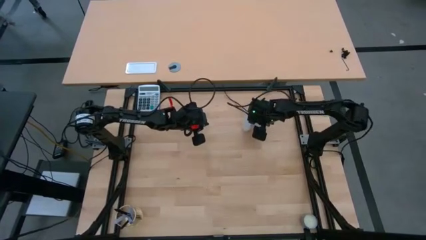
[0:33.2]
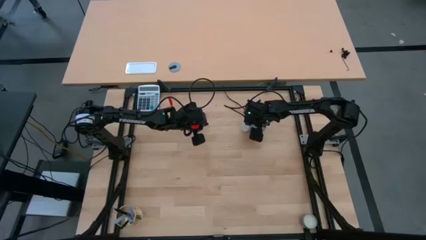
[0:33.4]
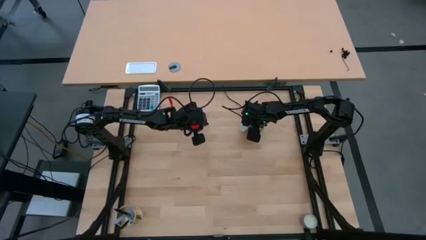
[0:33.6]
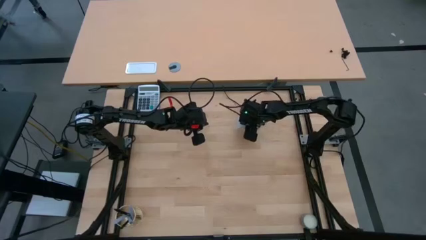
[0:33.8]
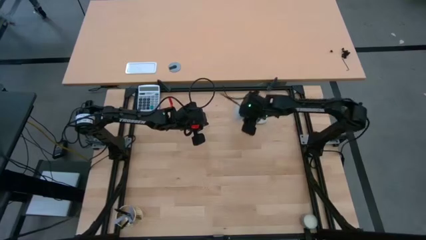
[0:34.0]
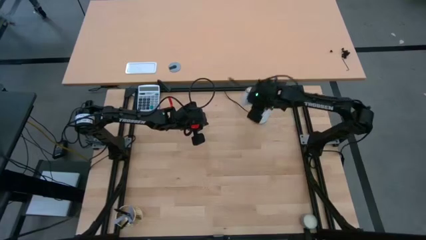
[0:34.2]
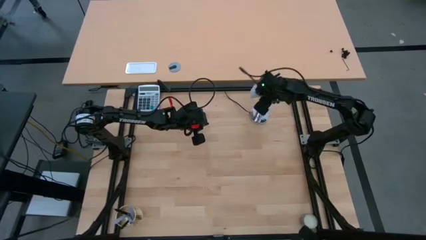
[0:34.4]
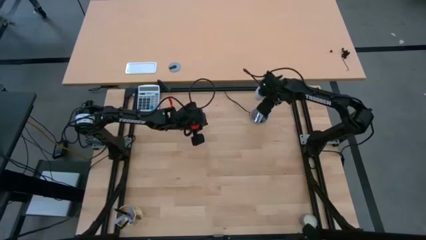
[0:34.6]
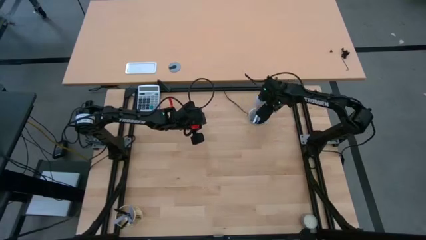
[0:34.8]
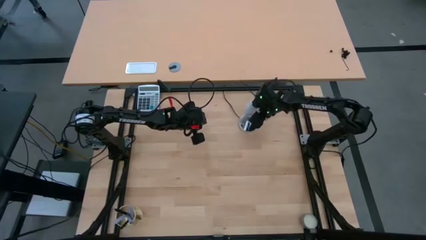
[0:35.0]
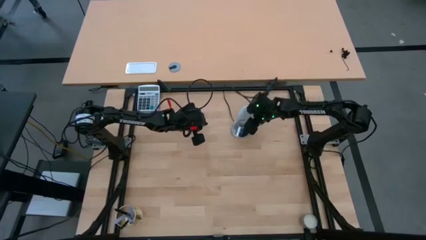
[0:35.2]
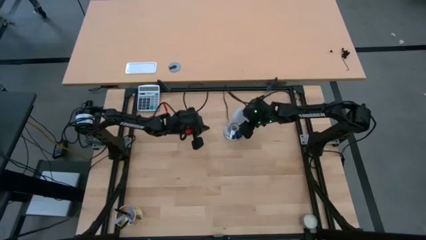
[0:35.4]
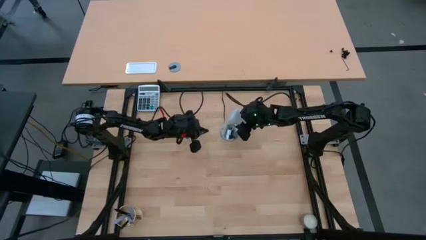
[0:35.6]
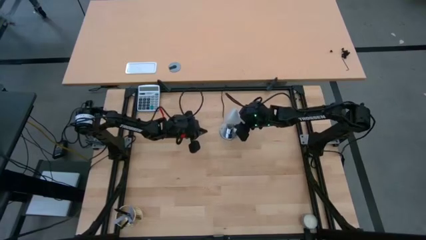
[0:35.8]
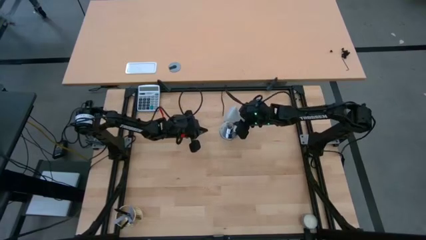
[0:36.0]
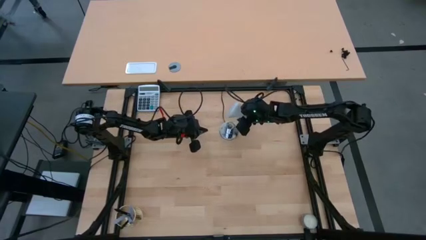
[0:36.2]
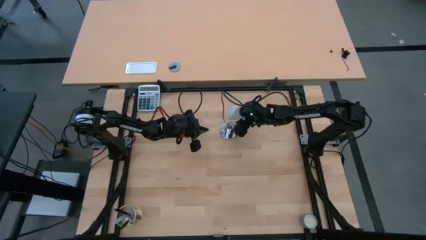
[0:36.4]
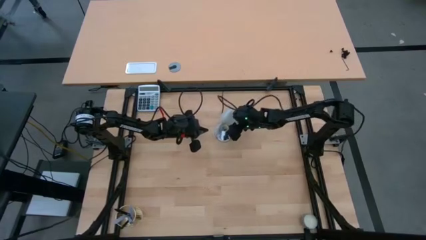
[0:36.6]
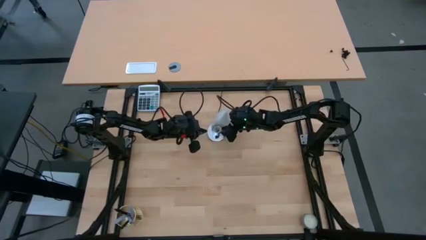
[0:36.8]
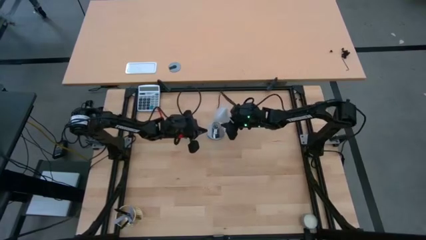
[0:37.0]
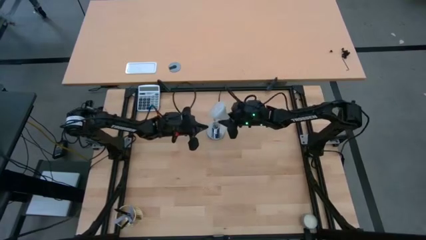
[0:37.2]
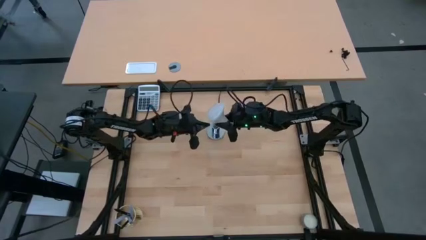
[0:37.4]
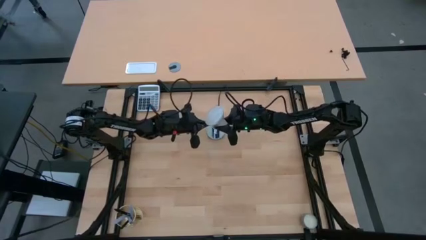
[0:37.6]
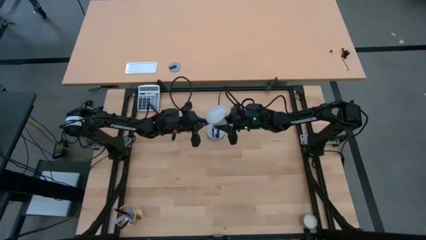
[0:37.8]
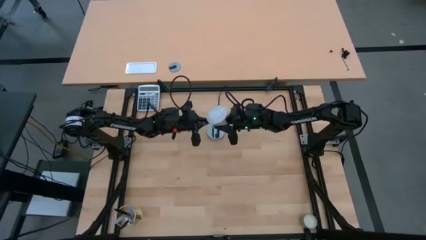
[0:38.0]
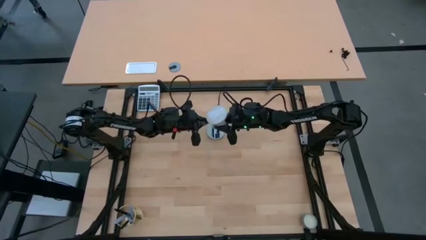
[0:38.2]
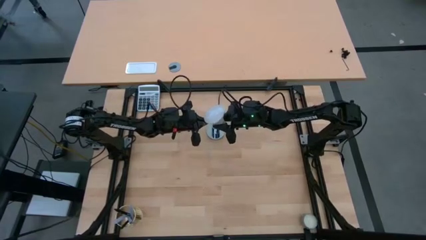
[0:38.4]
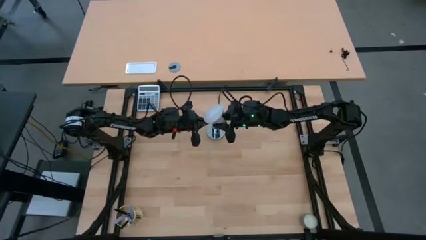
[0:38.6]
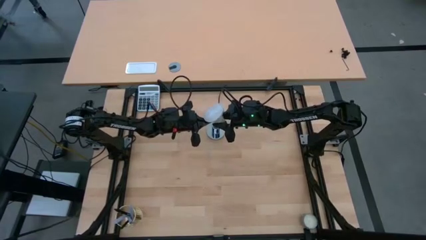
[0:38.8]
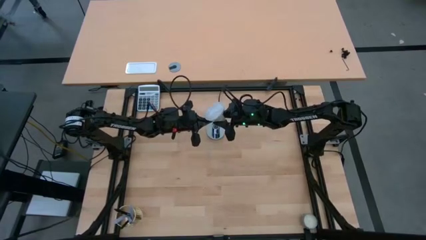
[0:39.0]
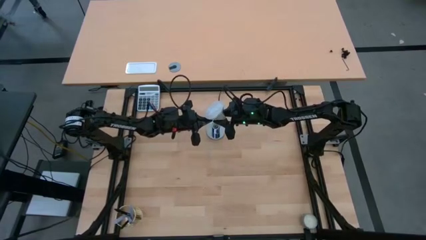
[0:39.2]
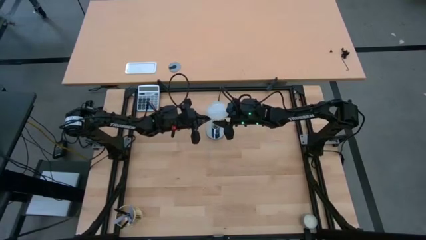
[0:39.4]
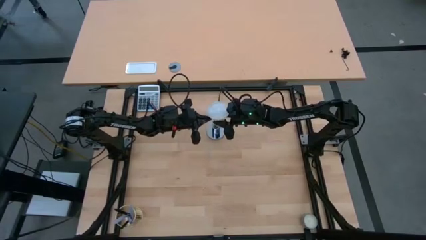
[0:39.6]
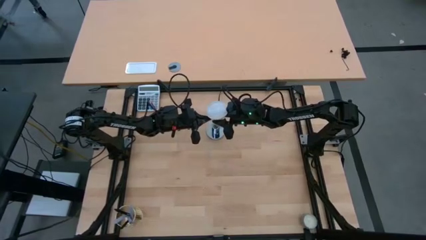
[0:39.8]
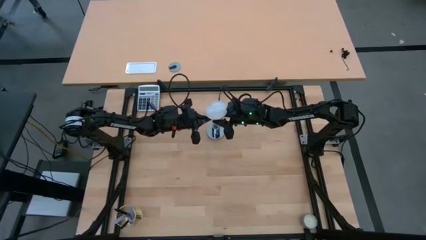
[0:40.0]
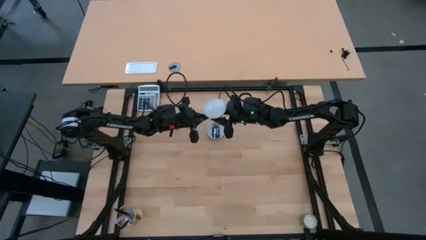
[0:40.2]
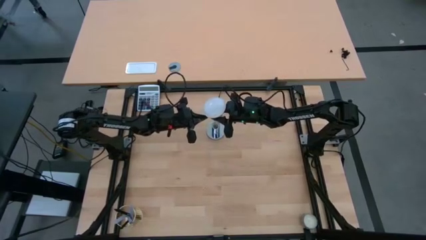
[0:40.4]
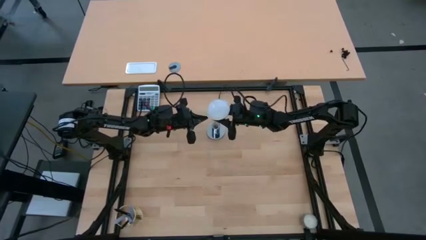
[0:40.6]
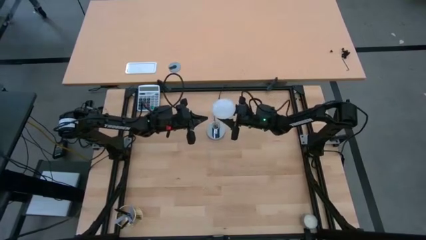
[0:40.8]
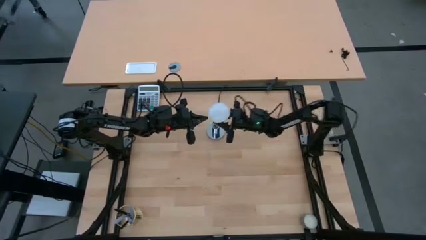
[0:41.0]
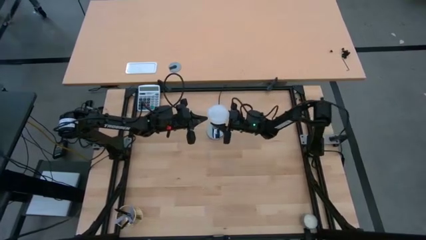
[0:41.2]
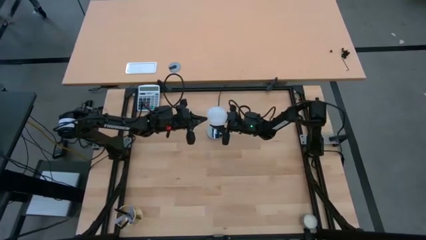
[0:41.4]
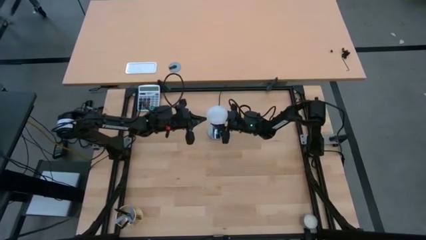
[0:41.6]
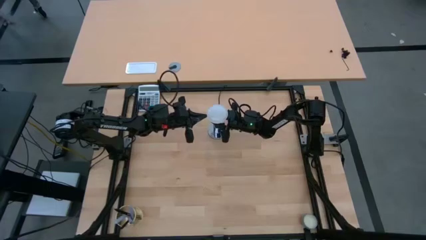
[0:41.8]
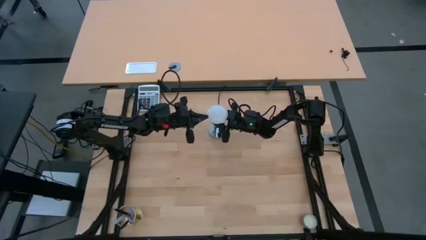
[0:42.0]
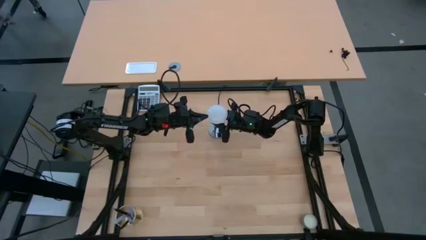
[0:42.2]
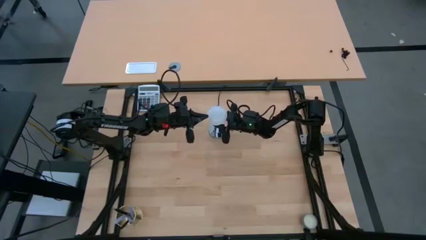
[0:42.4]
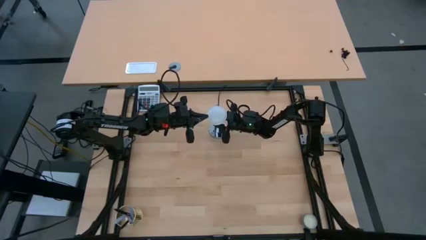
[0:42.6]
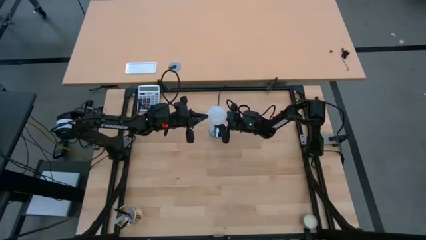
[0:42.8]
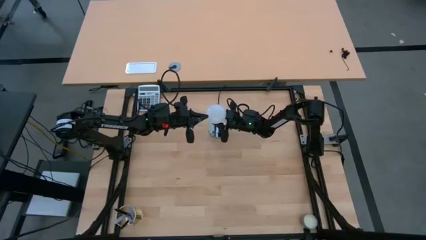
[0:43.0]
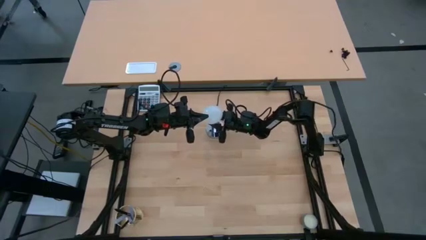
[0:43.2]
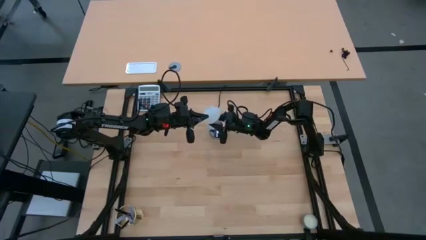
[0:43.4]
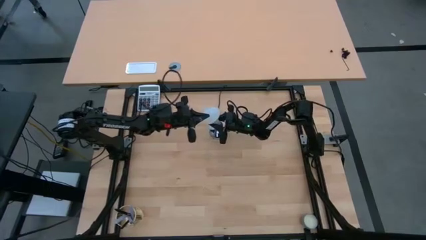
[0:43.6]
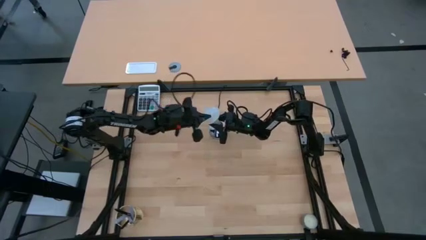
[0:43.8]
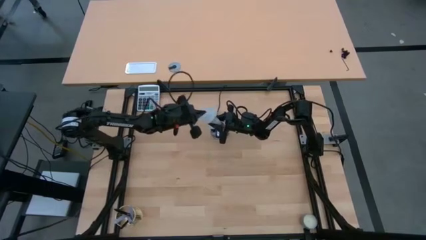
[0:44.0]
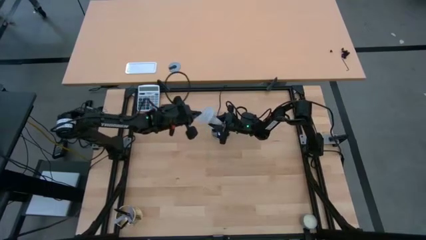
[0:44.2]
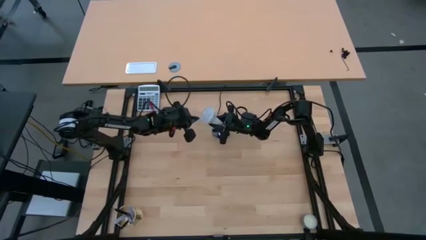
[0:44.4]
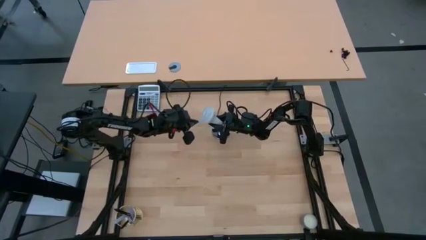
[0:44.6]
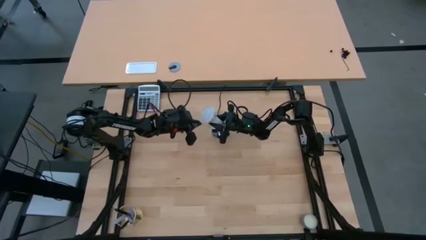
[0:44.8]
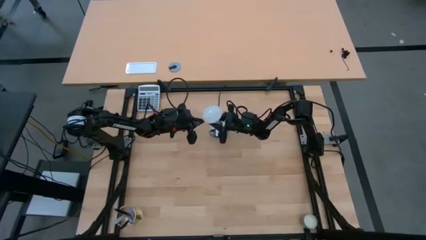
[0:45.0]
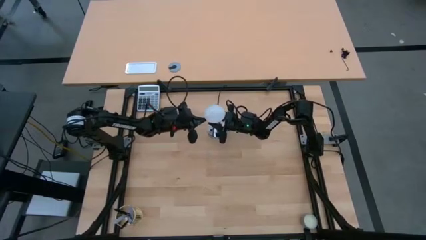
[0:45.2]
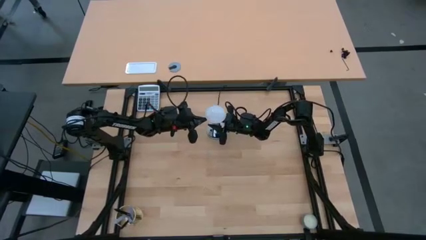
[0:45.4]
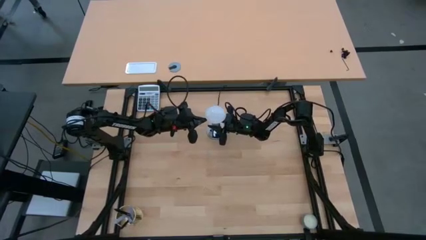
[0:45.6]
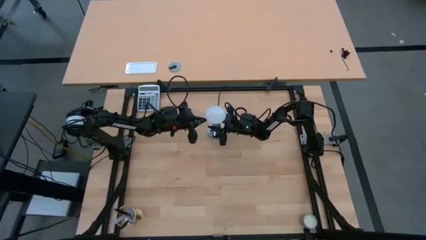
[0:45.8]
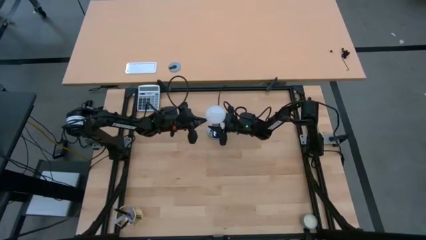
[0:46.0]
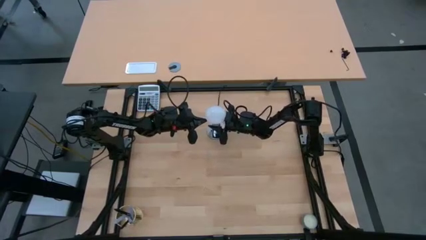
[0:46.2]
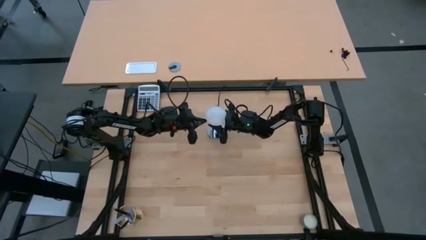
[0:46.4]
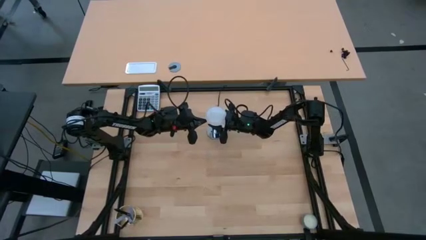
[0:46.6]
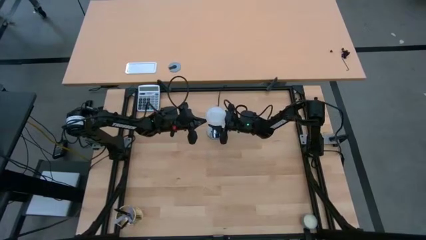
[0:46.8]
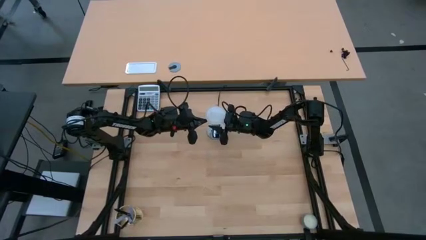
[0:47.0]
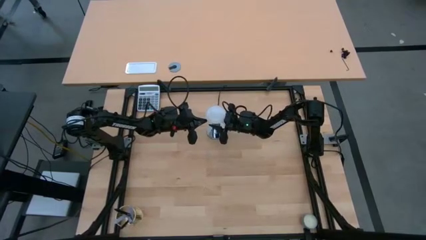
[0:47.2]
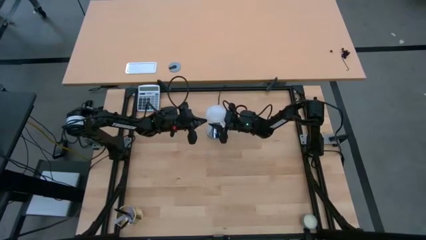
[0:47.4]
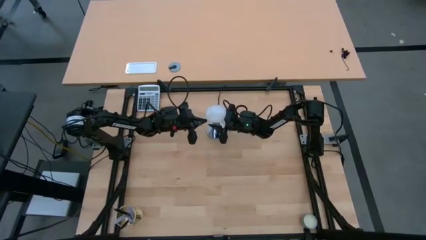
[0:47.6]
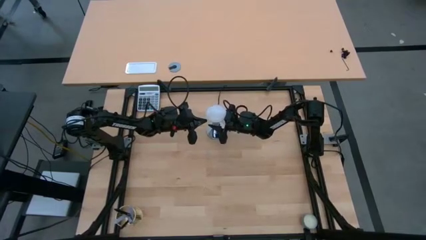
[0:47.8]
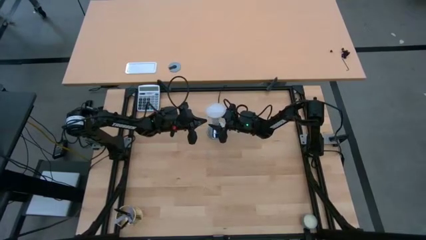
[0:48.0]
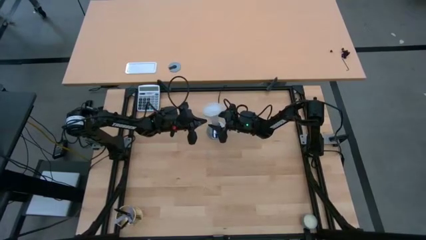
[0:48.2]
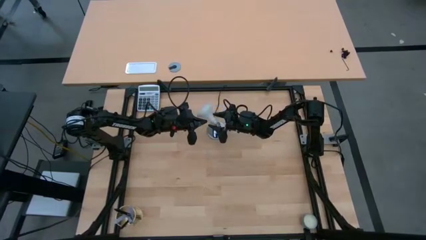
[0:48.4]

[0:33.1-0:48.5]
Task: Screw lightbulb
Insert the lightbulb into the lamp
